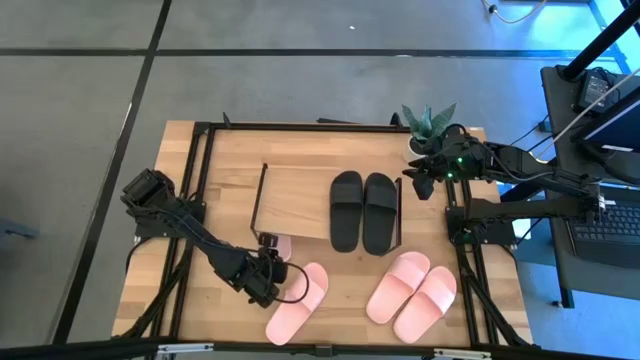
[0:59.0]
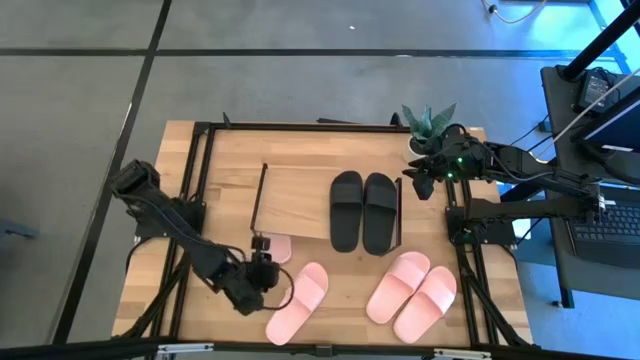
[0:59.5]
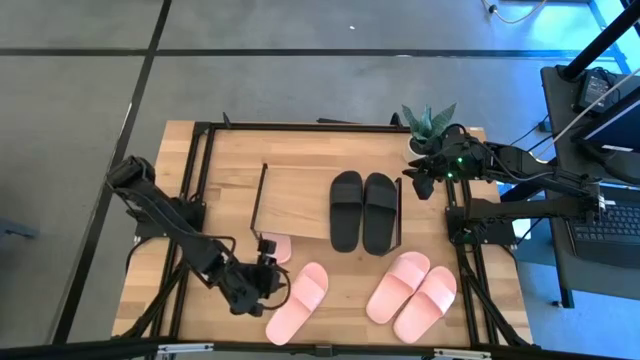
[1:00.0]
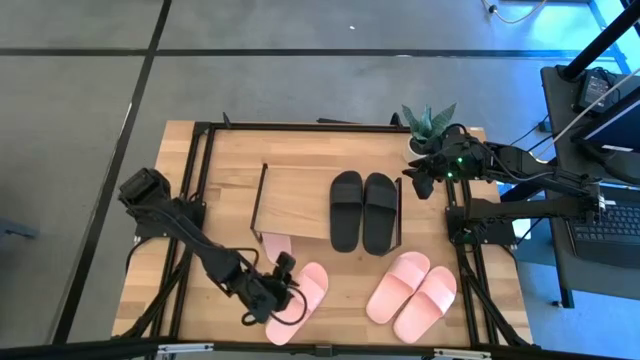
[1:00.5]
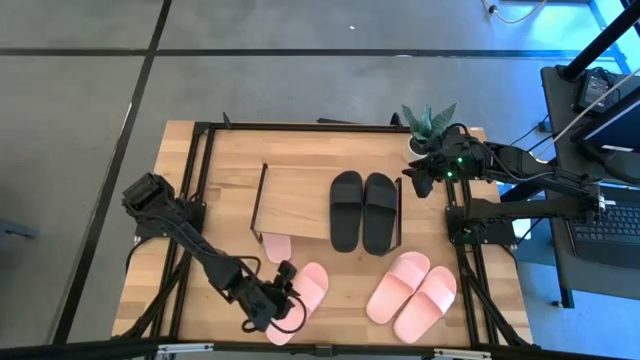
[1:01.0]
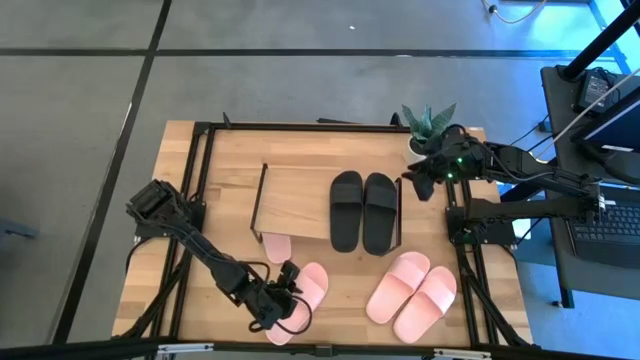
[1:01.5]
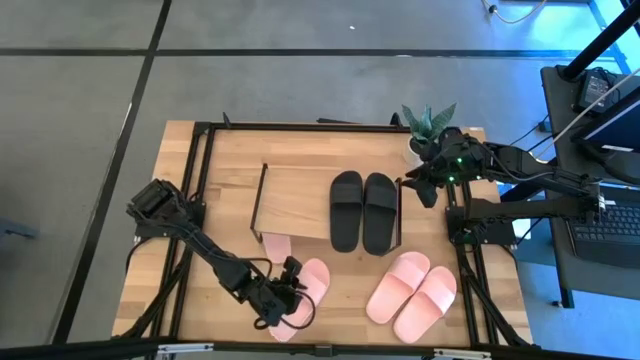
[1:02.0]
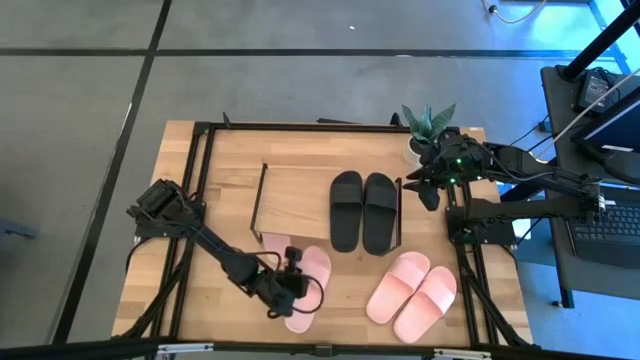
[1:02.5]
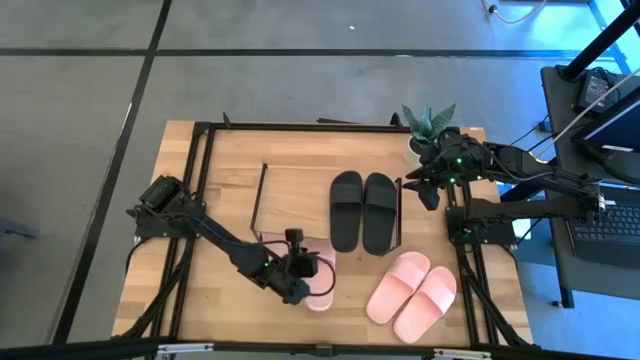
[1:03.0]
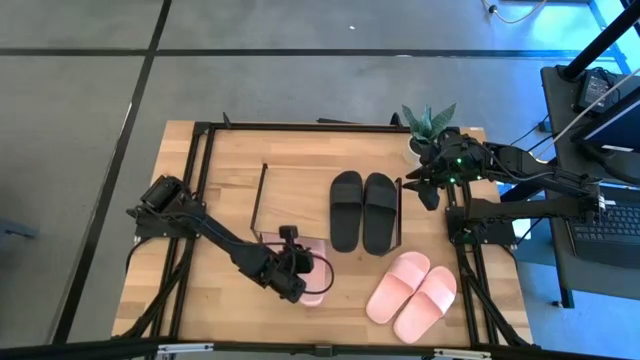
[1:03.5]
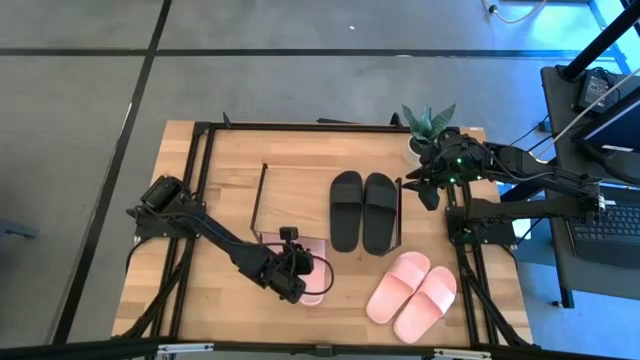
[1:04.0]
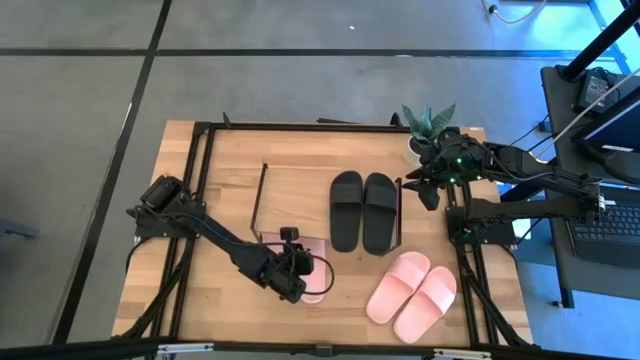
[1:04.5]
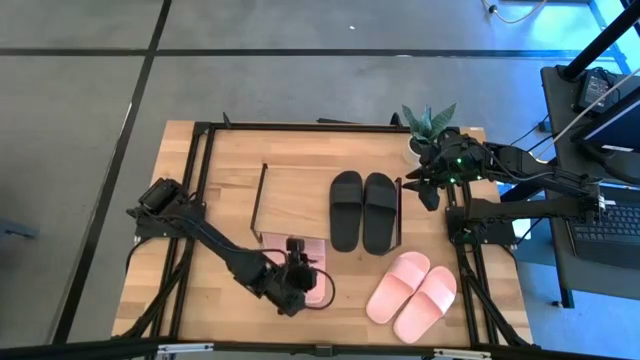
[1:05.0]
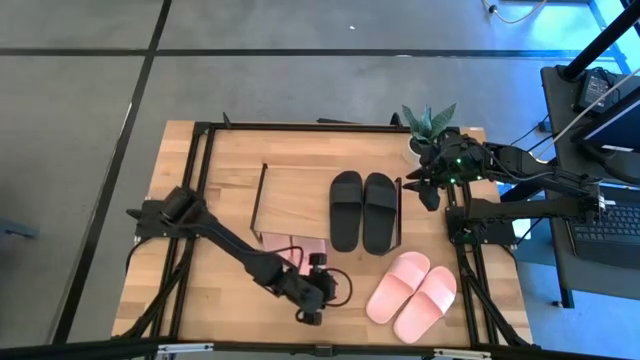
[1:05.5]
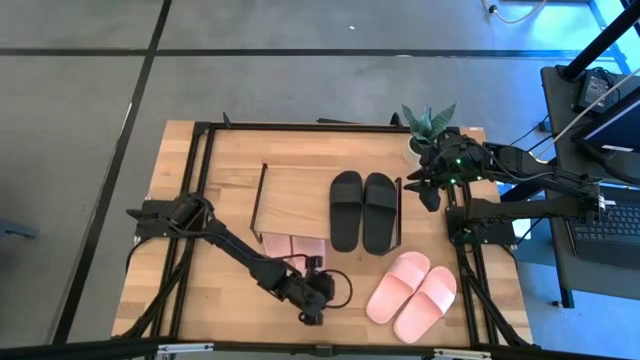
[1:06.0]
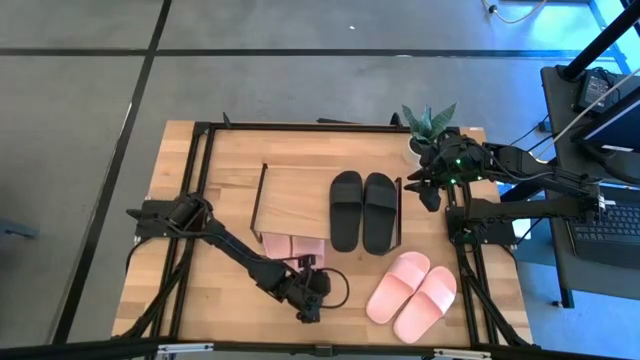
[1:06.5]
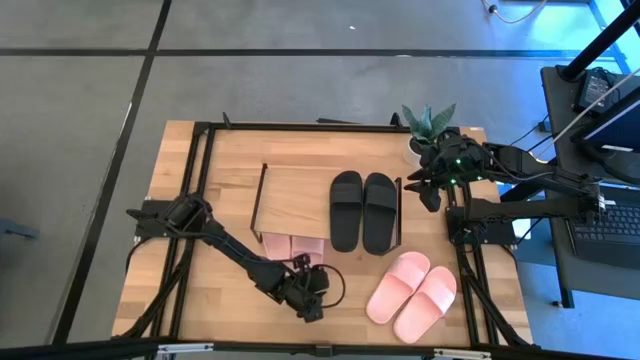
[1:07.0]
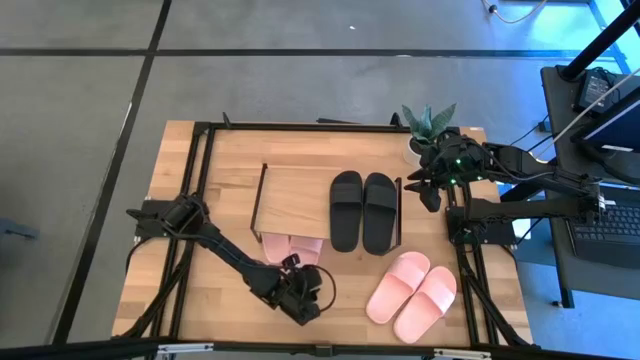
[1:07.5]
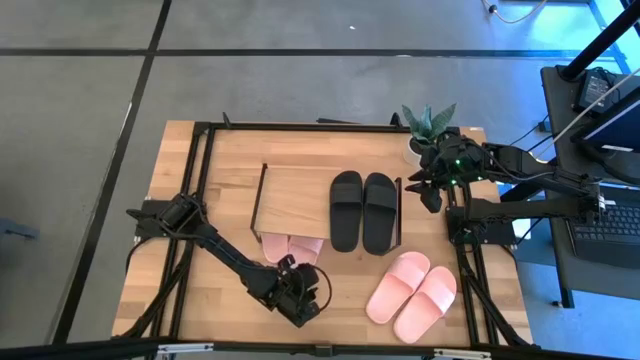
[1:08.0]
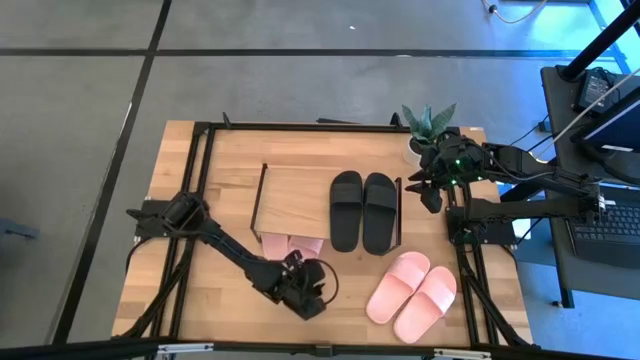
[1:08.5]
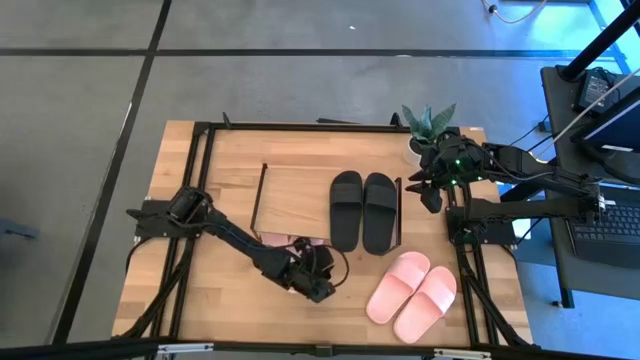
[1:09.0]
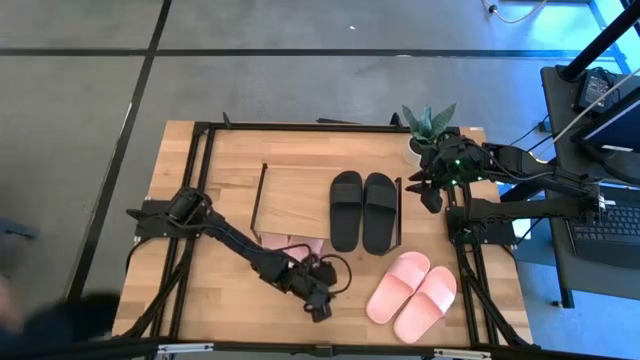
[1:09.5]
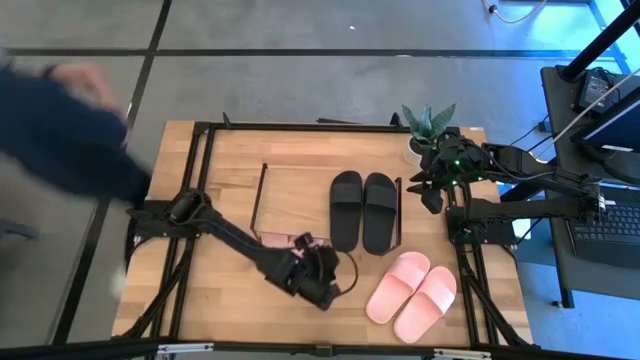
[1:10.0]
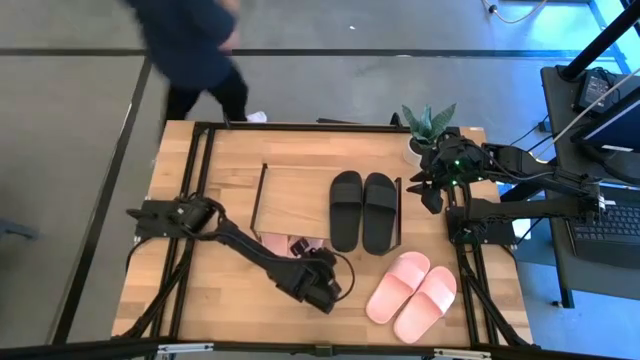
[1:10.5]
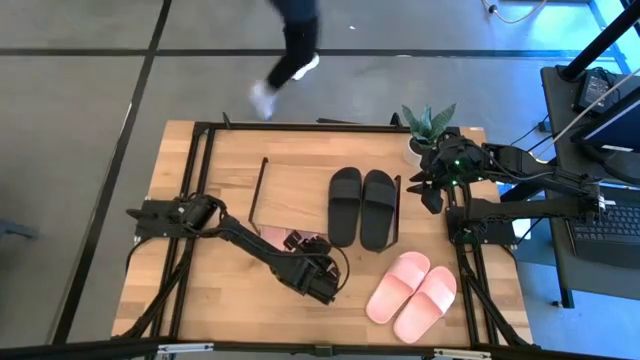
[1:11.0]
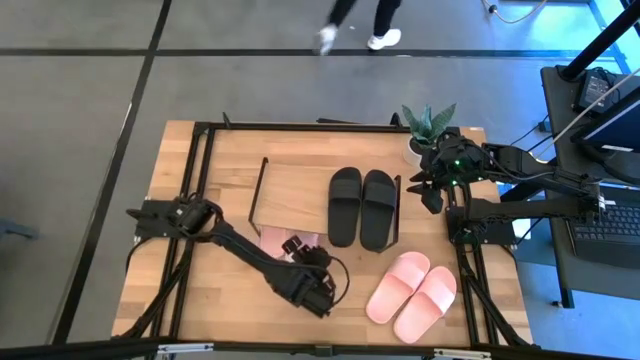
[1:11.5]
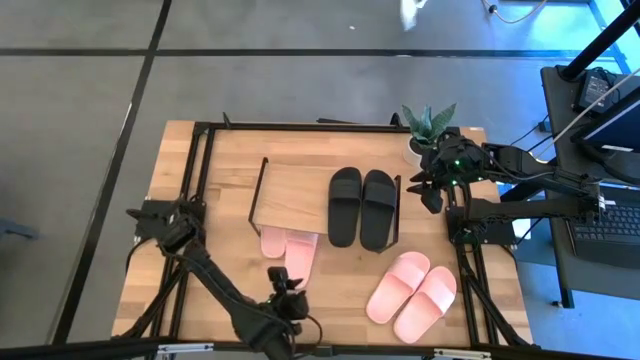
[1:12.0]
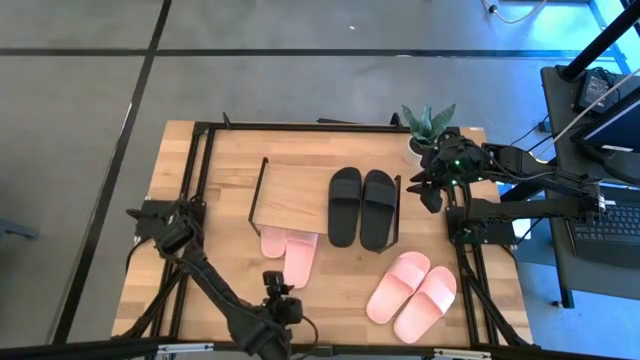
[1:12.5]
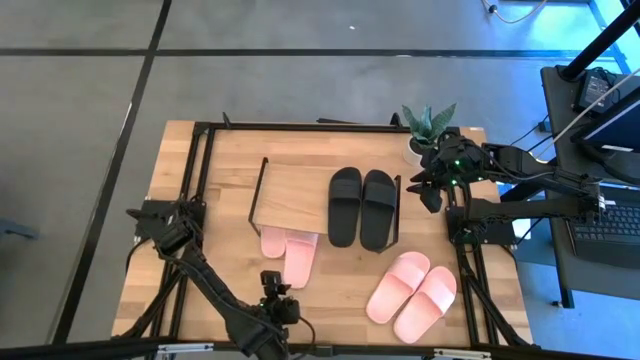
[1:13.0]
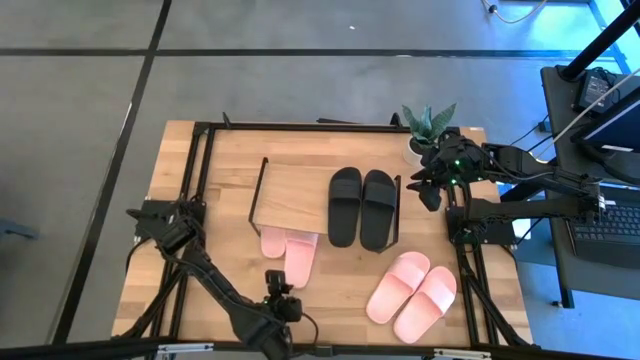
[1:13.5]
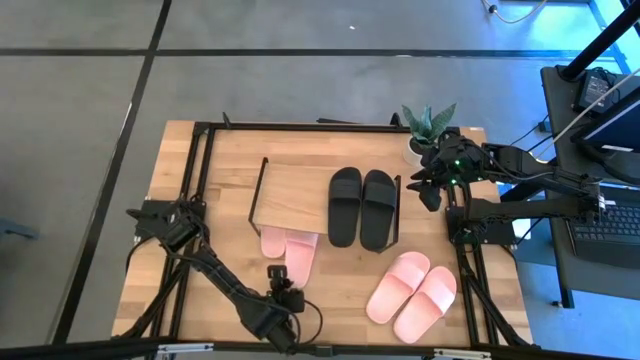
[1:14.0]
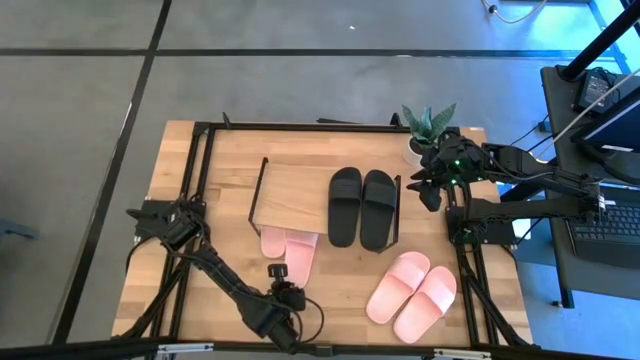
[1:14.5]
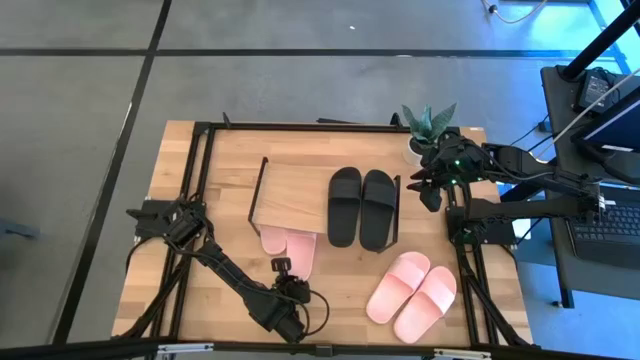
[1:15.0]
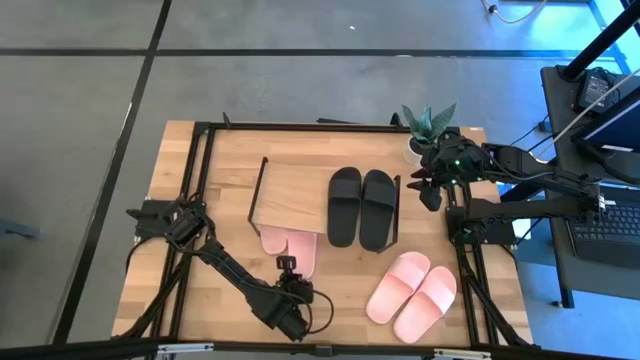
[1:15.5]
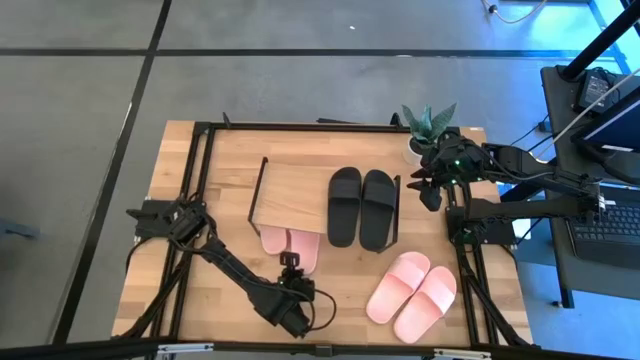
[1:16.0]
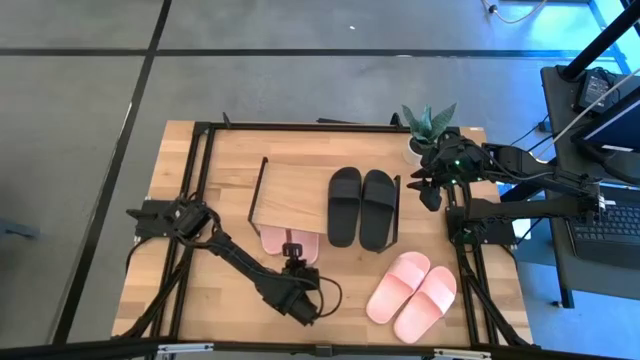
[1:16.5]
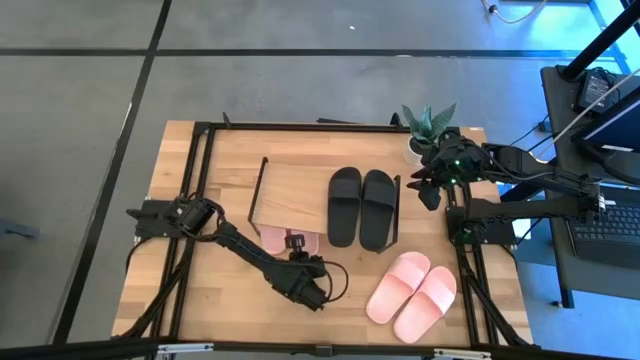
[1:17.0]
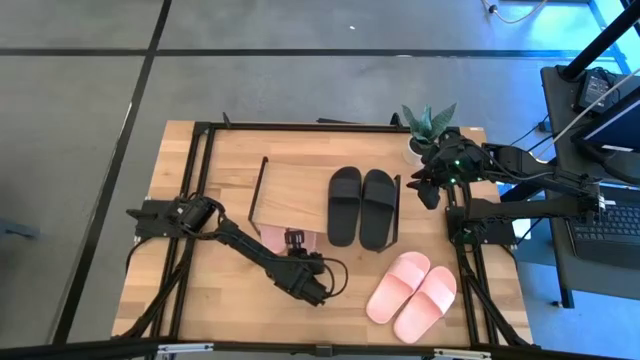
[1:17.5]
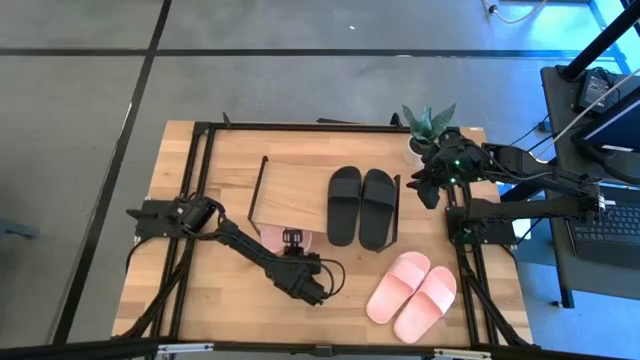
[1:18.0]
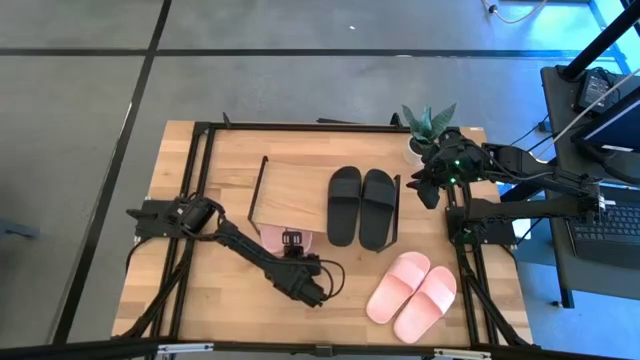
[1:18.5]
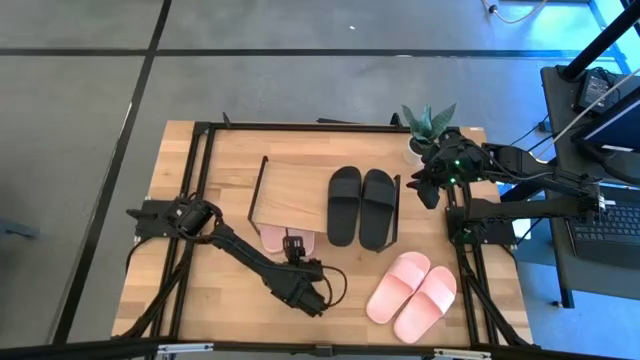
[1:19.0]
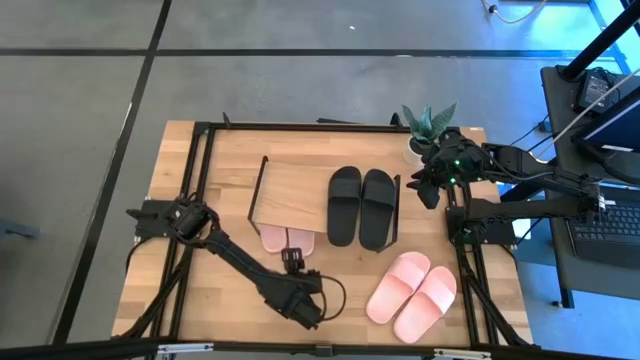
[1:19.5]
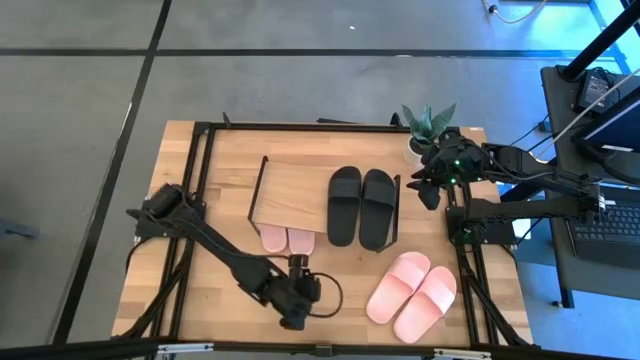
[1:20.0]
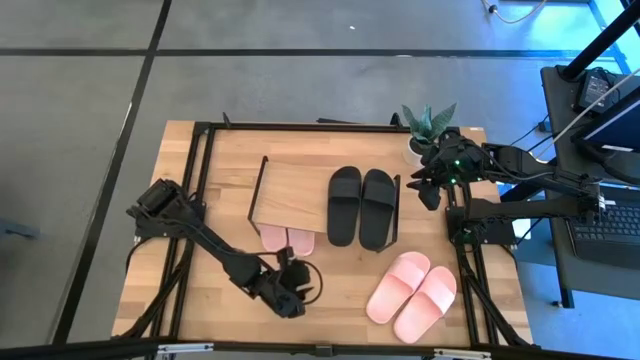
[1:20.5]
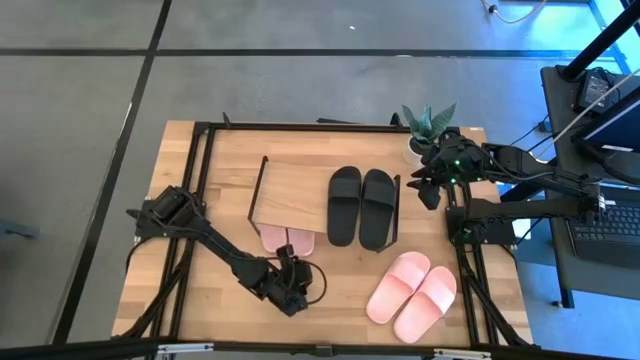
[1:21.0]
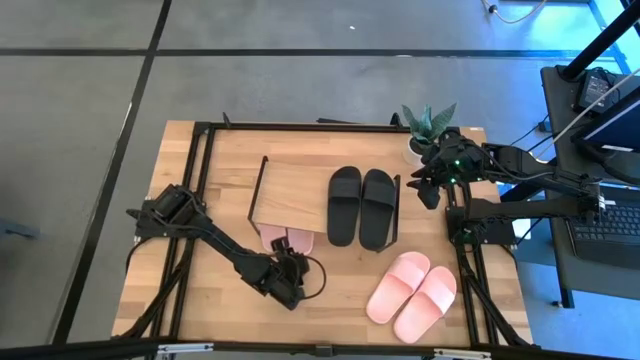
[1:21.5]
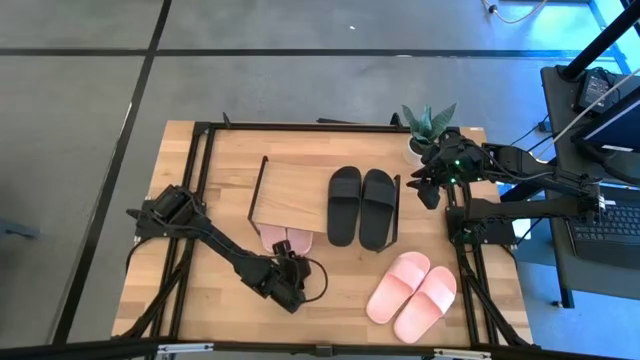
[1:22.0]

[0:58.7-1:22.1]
Task: Pick and place slides into the shelf
Put the left pink slides under the shelf
